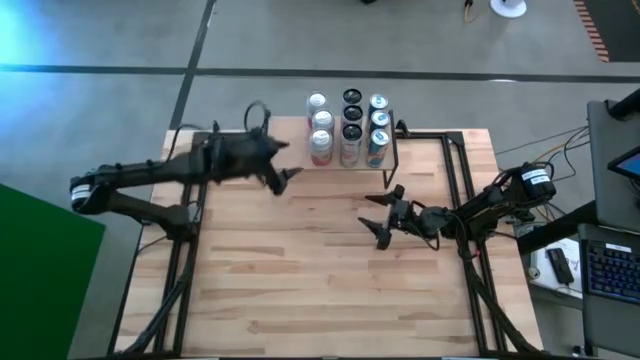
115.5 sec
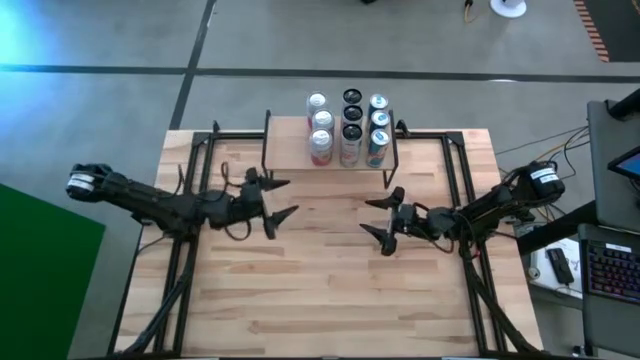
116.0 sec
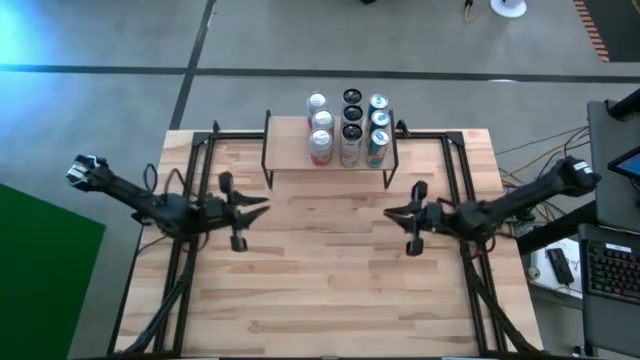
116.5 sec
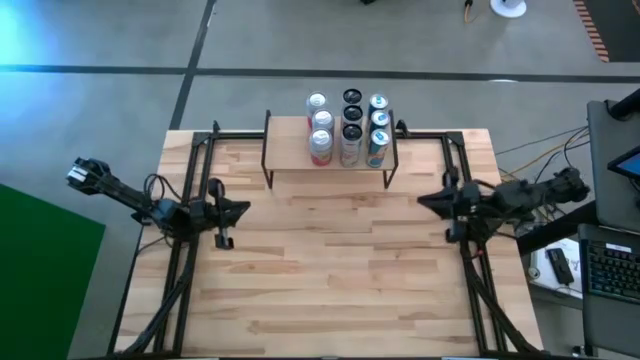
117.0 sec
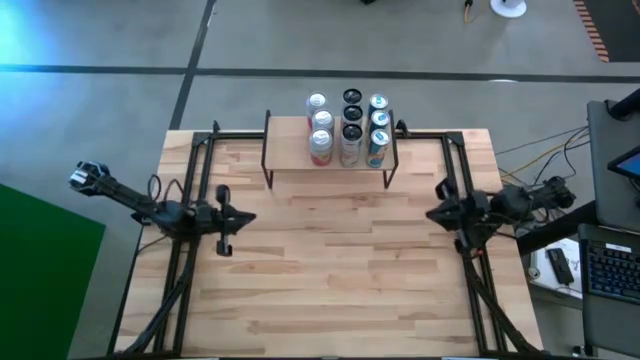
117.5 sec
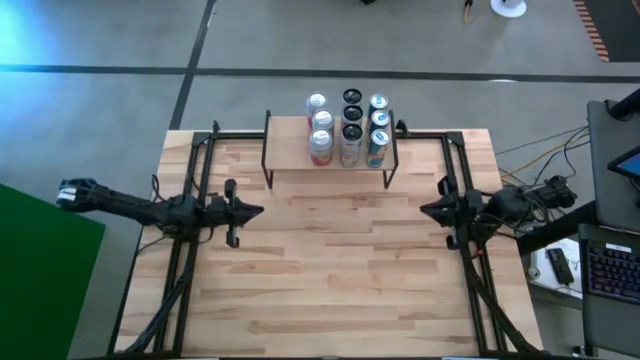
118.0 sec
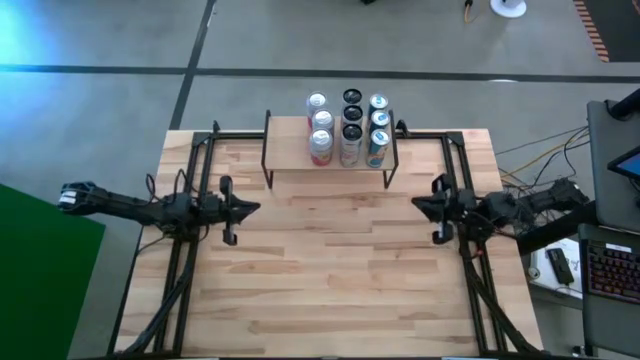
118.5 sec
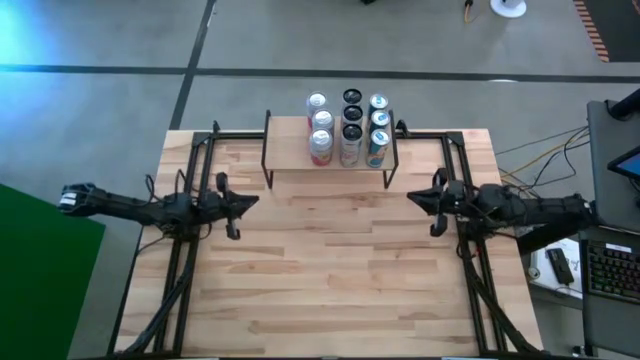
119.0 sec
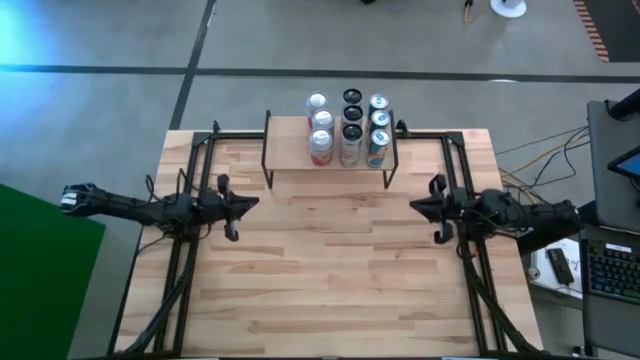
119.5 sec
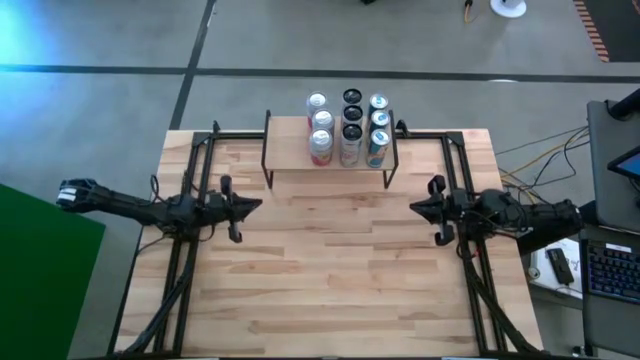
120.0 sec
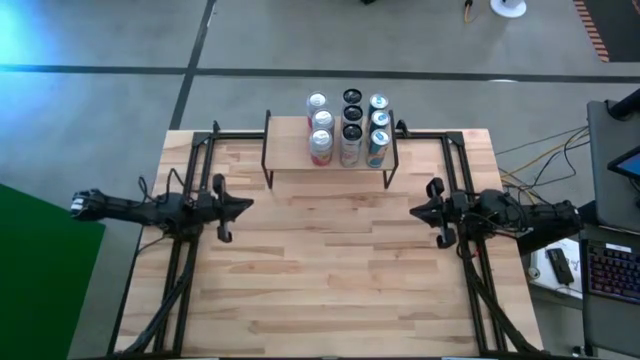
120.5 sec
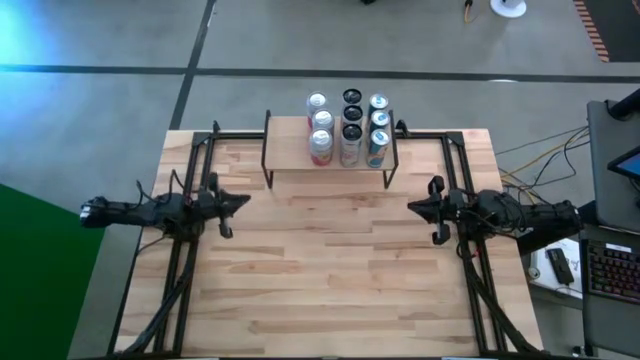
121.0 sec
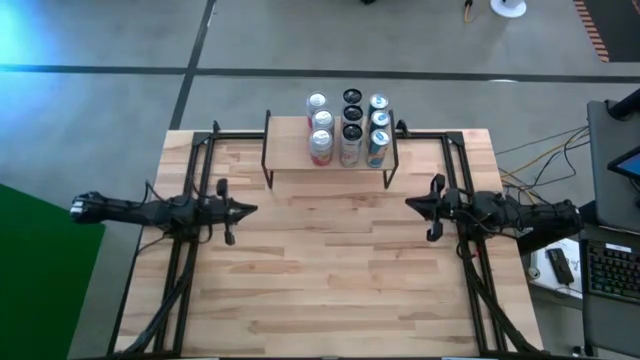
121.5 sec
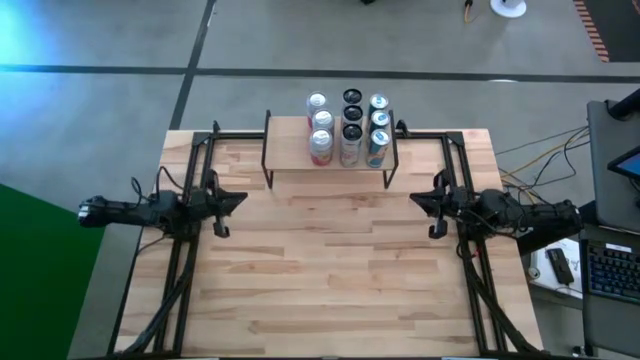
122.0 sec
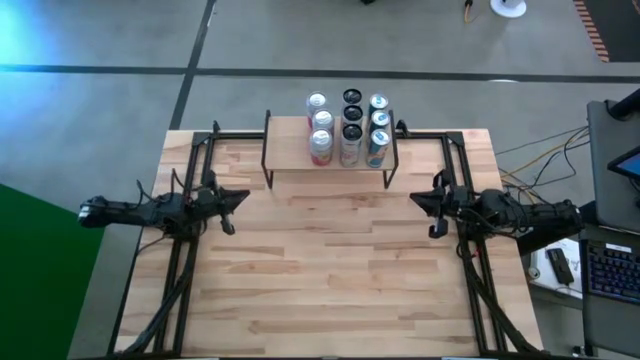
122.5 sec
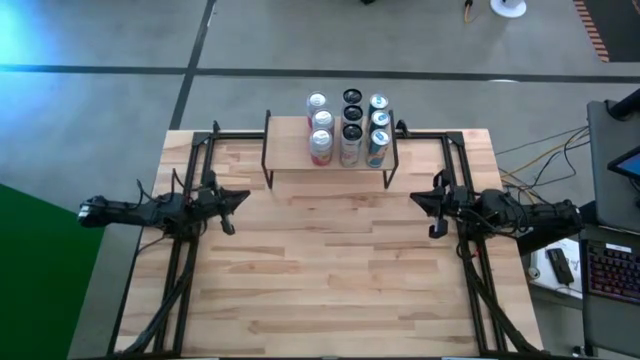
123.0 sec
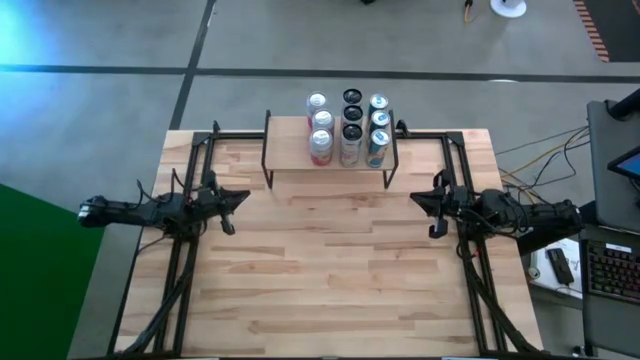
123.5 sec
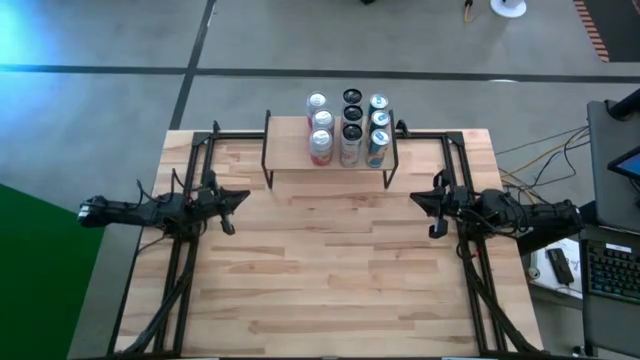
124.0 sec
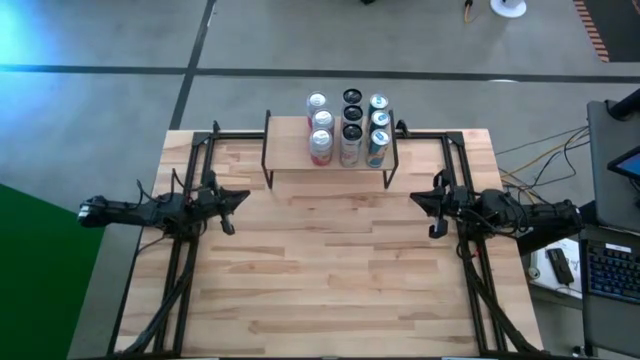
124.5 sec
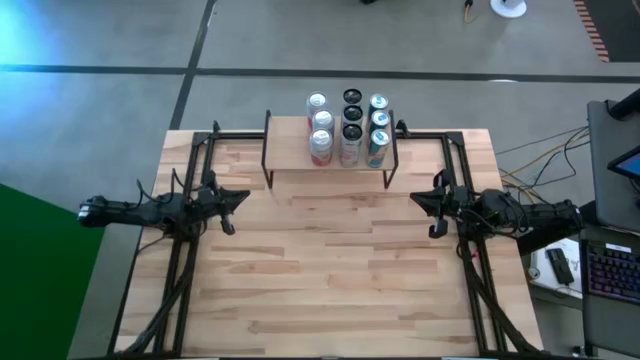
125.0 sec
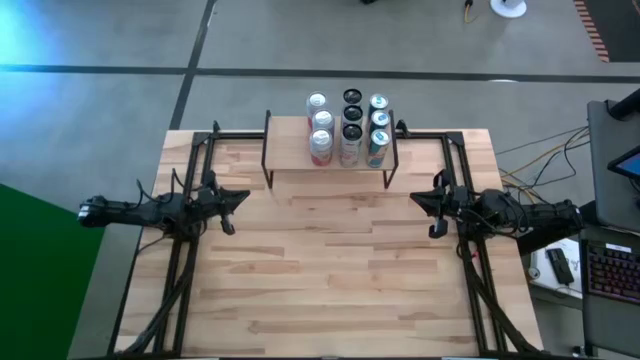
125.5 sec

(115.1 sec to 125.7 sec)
Task: Place canned beverage on shelf
Return to Home Position

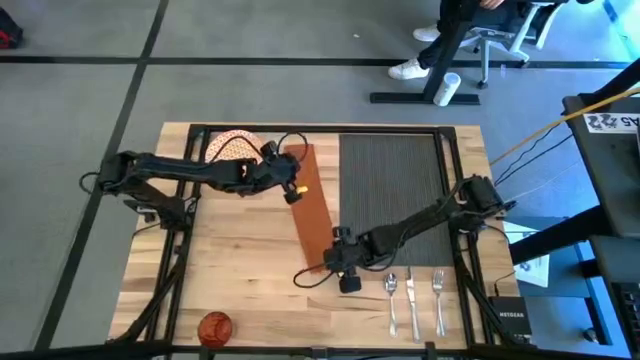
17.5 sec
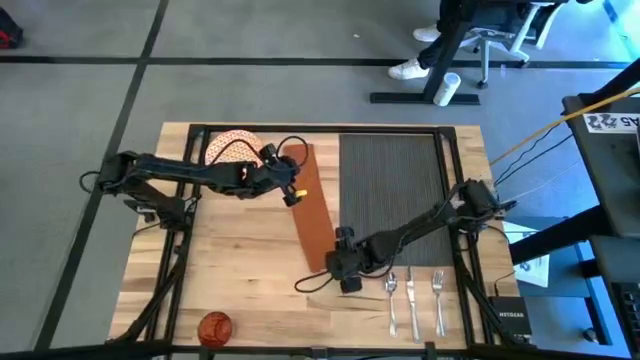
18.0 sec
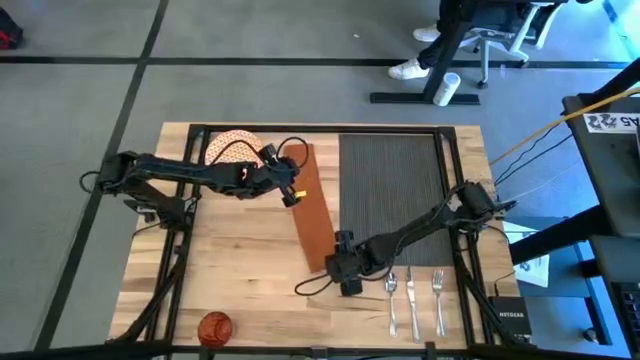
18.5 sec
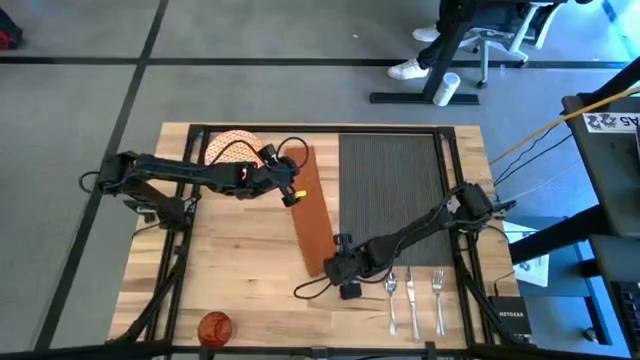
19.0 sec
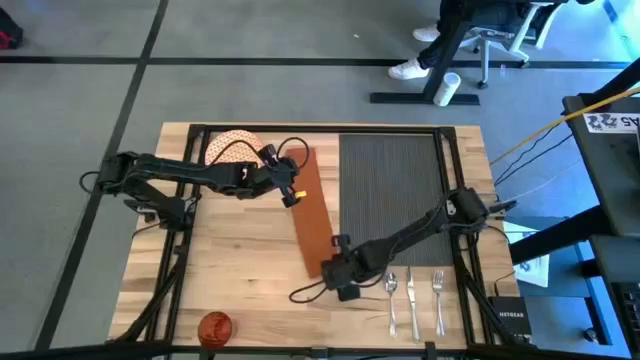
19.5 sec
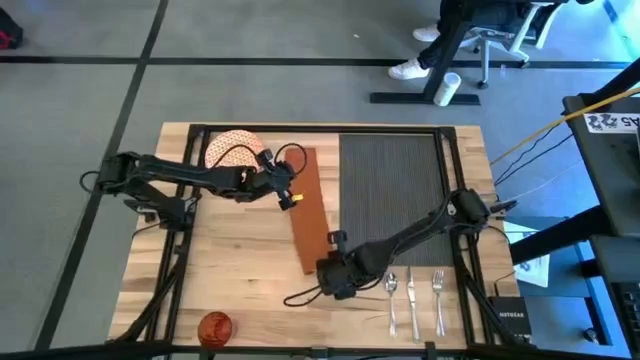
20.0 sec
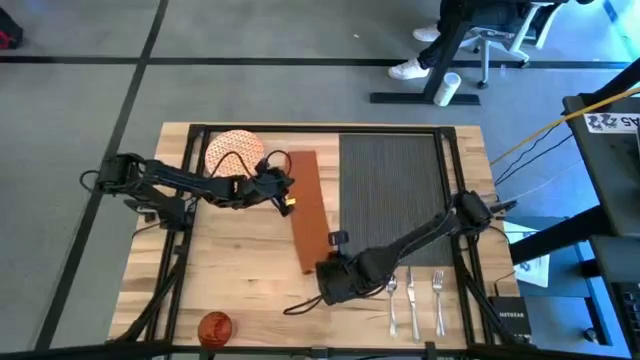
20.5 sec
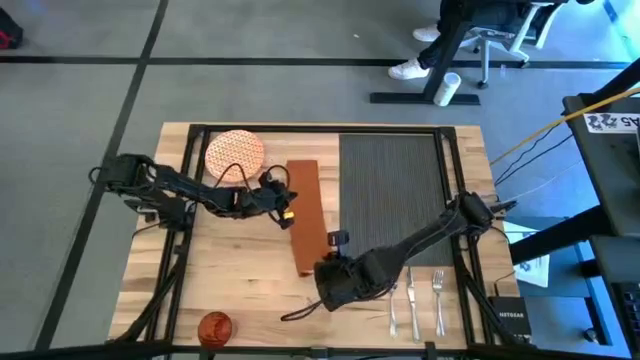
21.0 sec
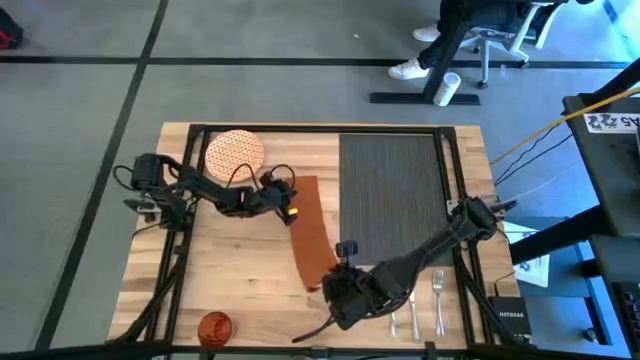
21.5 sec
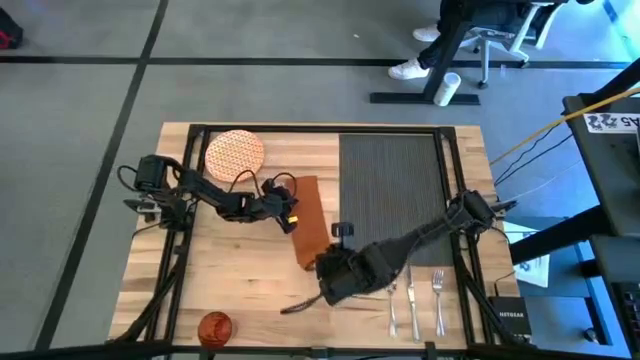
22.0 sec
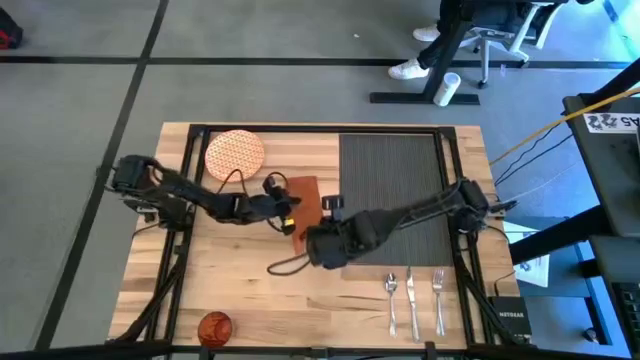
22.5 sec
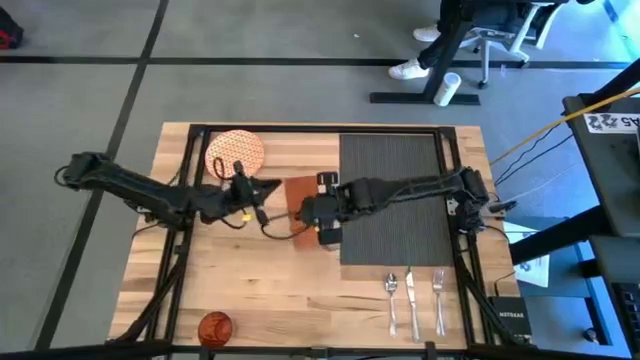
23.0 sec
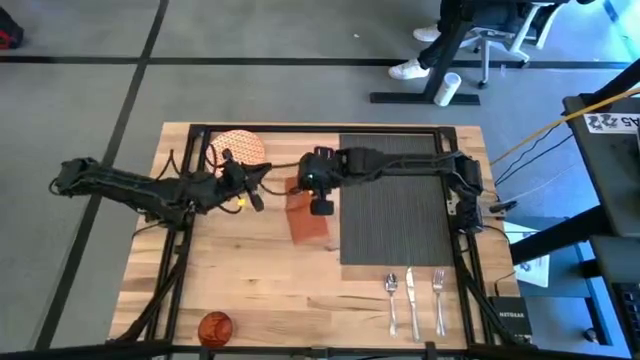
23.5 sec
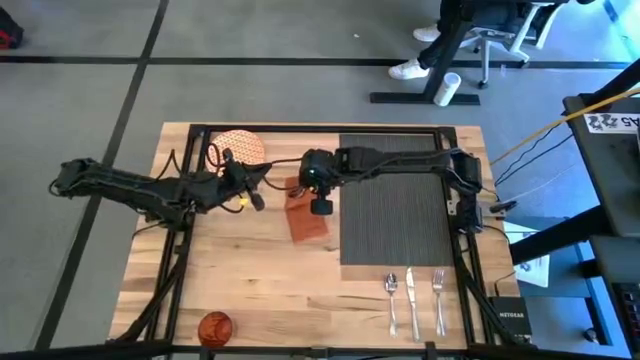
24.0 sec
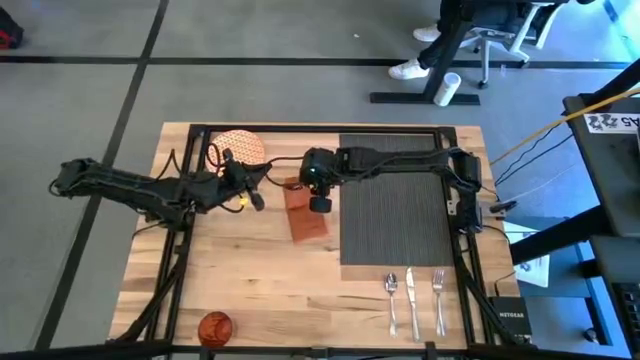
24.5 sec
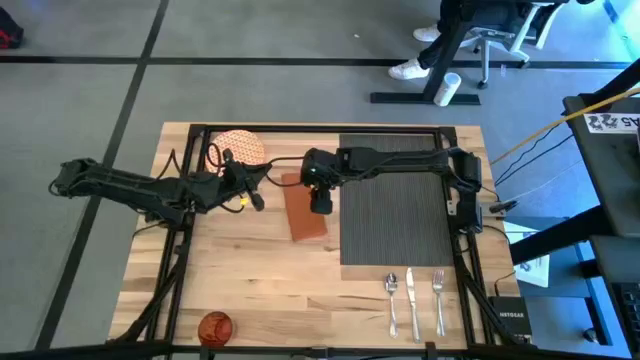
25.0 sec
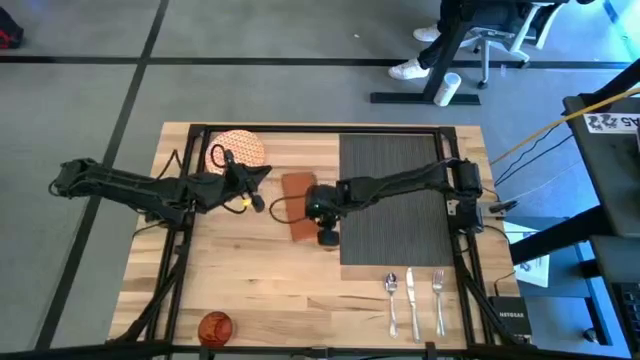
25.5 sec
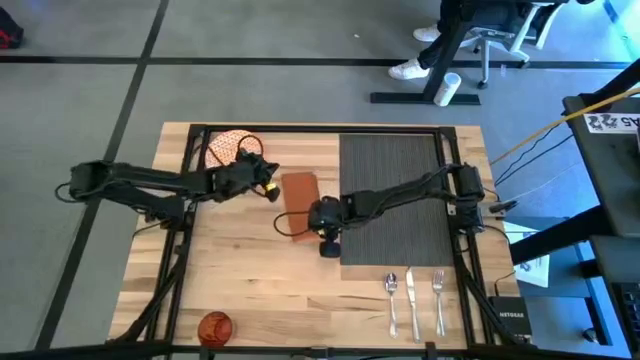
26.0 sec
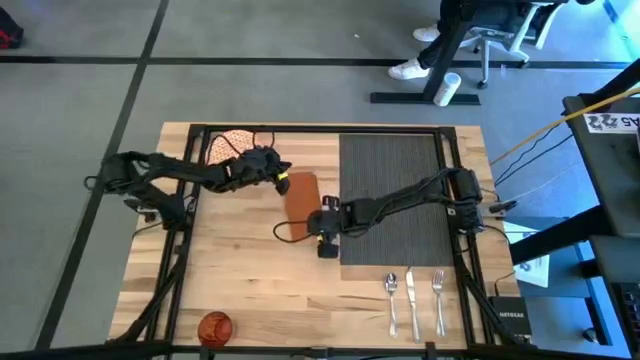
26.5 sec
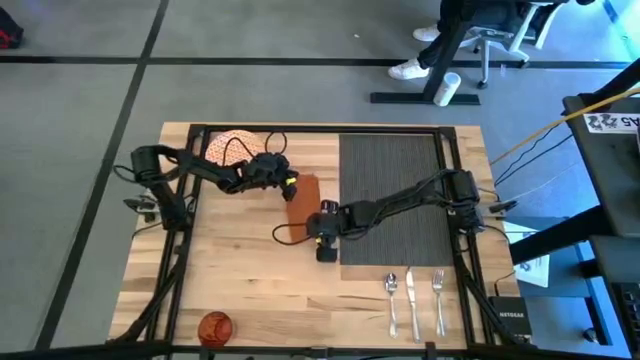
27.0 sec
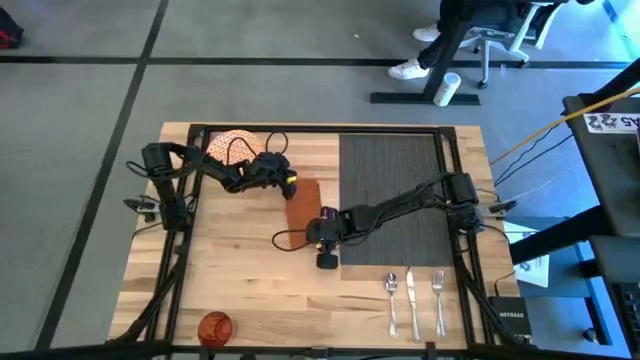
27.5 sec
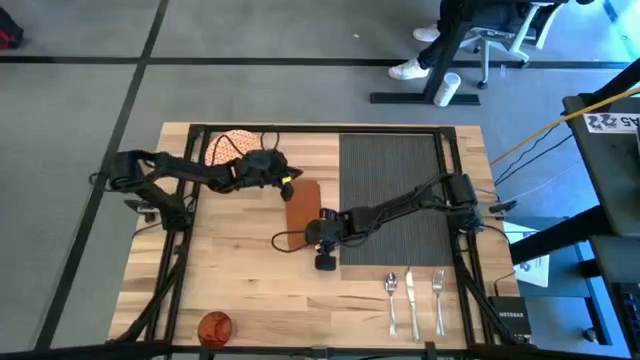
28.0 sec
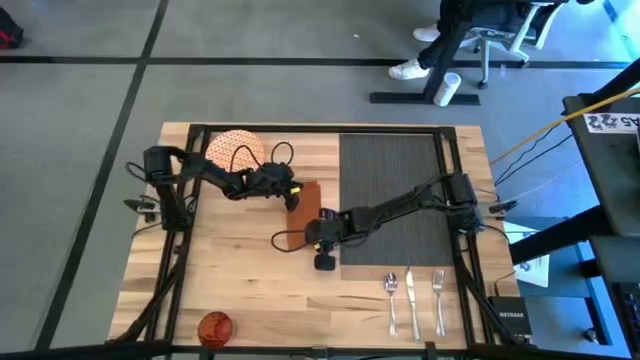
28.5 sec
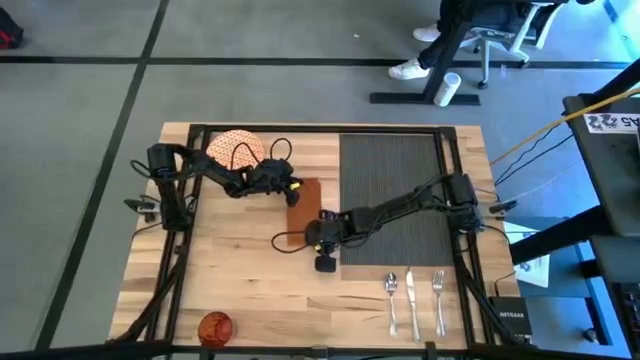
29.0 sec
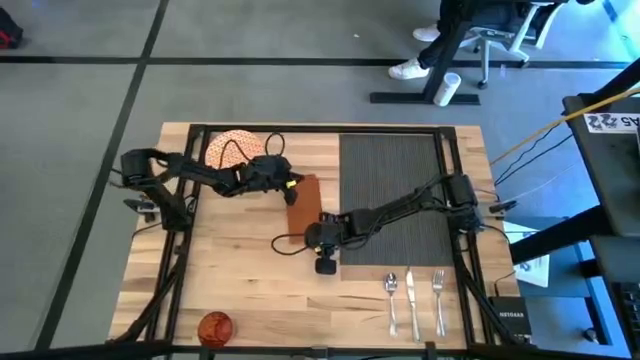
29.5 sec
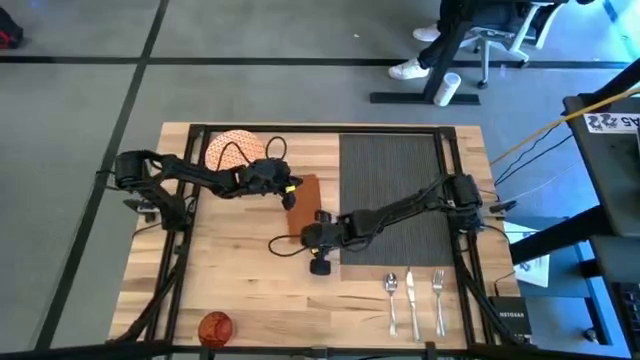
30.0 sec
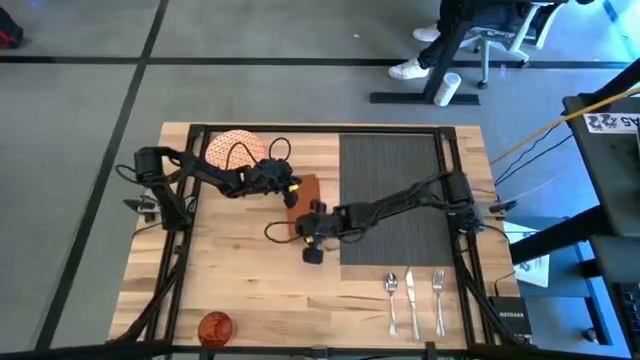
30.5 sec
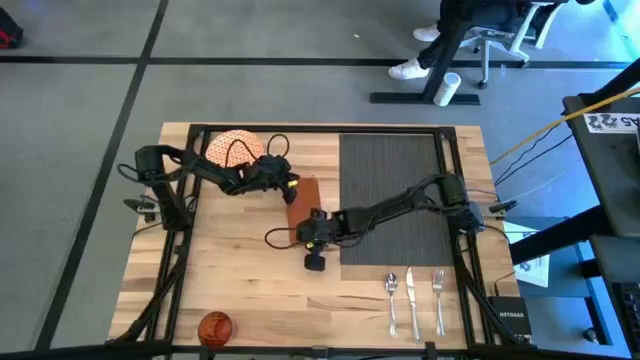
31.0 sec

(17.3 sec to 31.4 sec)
Task: Set table place
Fold the orange table napkin
